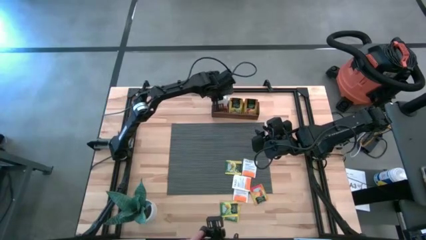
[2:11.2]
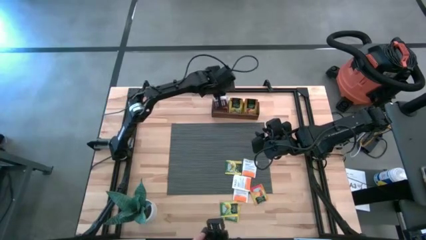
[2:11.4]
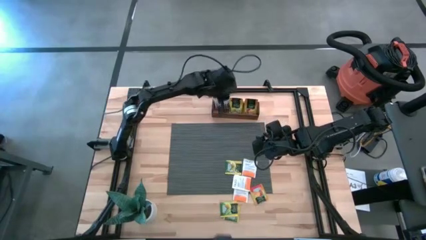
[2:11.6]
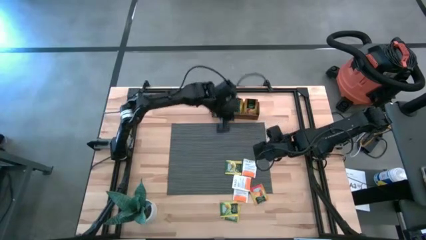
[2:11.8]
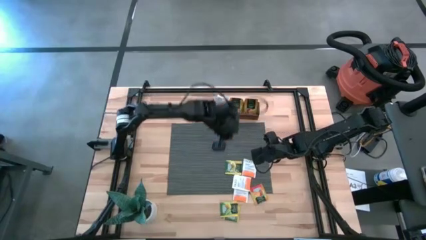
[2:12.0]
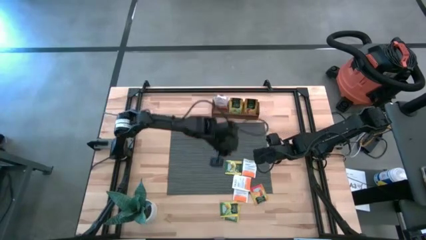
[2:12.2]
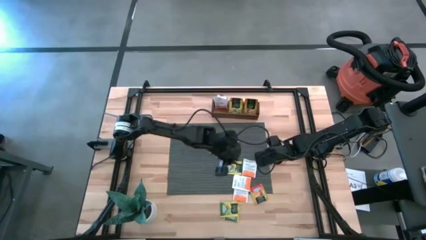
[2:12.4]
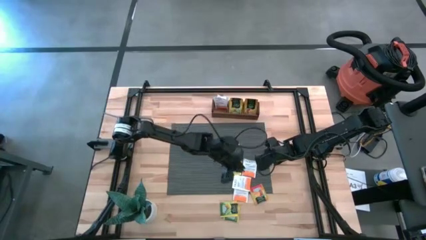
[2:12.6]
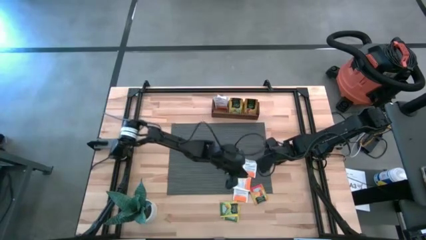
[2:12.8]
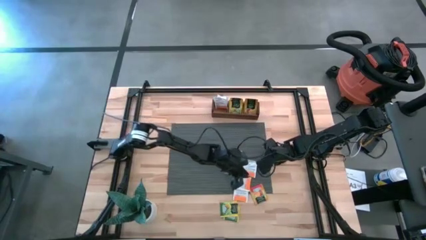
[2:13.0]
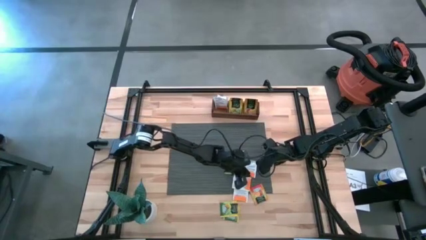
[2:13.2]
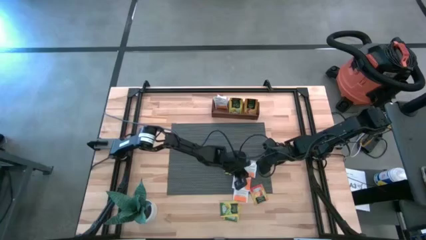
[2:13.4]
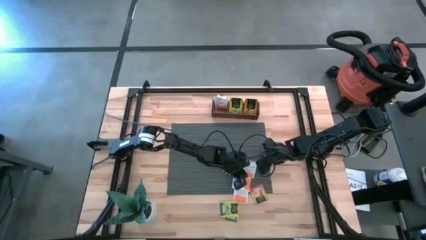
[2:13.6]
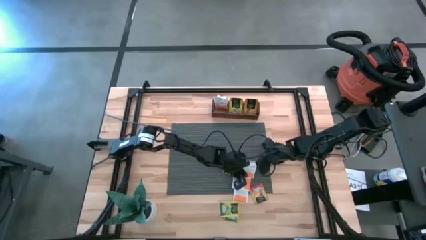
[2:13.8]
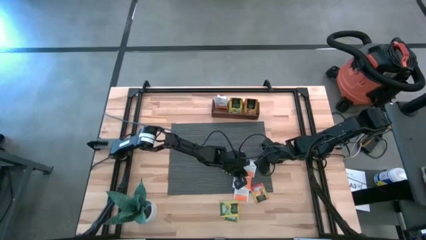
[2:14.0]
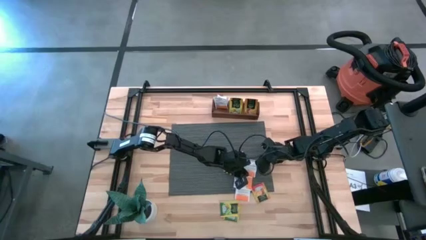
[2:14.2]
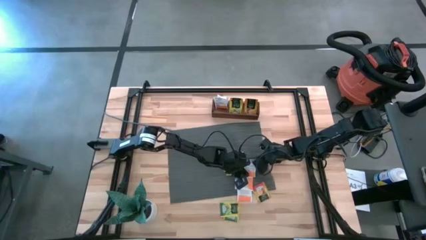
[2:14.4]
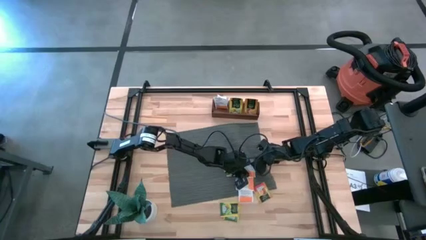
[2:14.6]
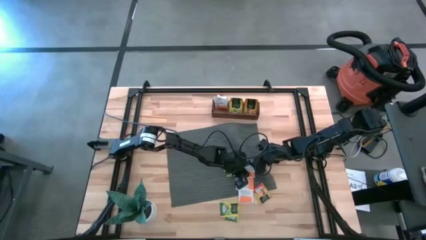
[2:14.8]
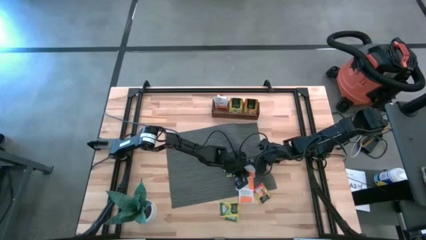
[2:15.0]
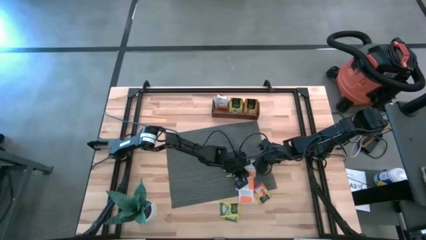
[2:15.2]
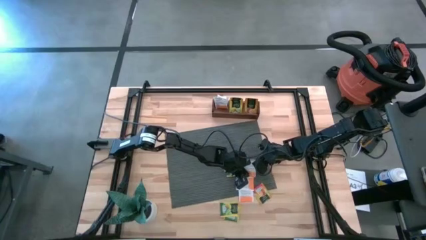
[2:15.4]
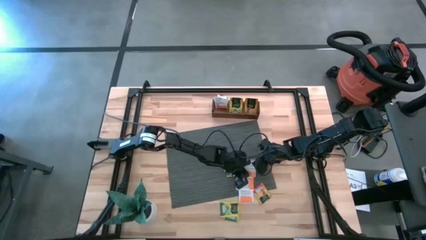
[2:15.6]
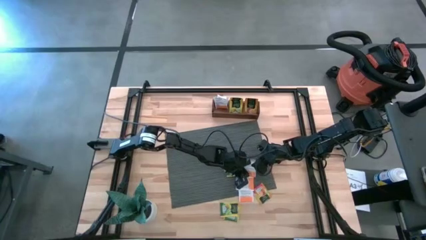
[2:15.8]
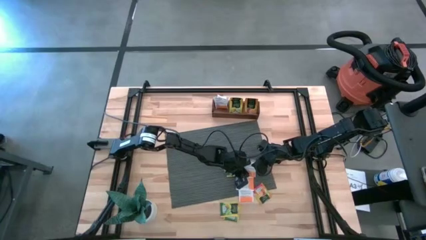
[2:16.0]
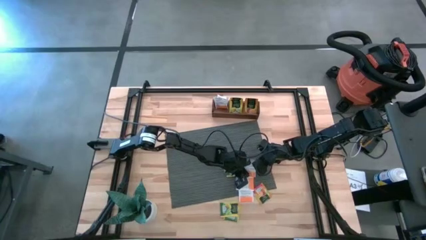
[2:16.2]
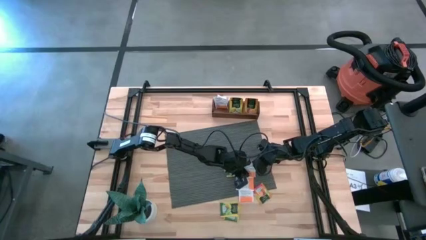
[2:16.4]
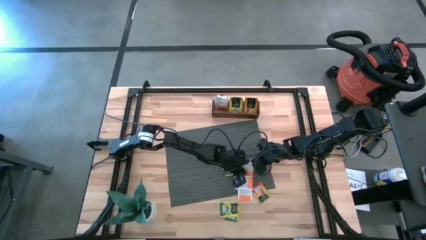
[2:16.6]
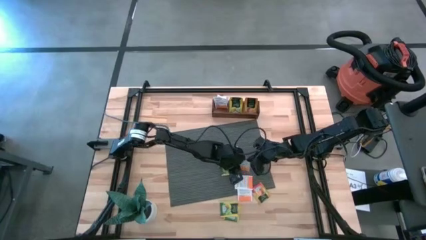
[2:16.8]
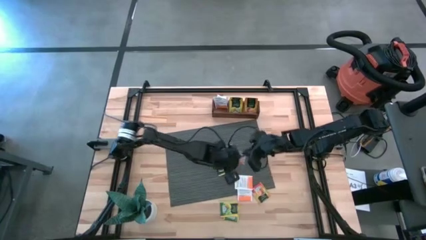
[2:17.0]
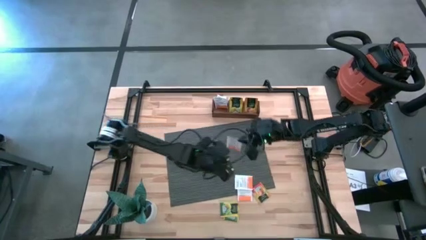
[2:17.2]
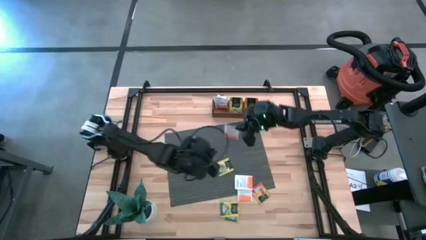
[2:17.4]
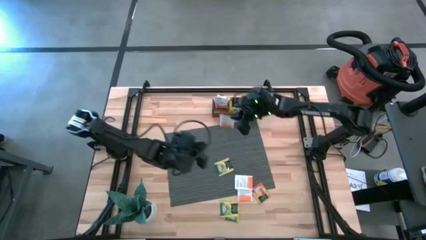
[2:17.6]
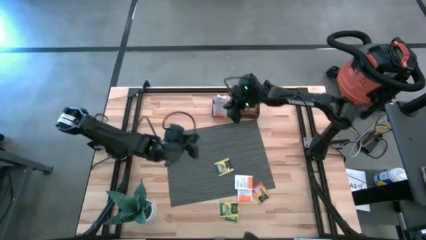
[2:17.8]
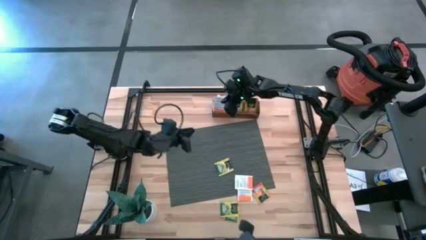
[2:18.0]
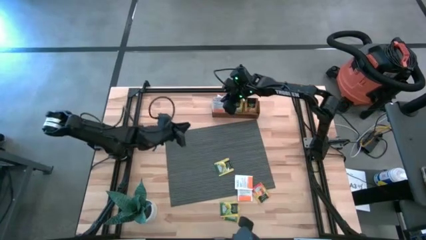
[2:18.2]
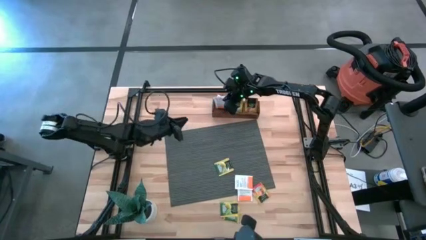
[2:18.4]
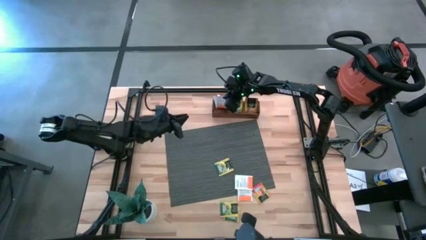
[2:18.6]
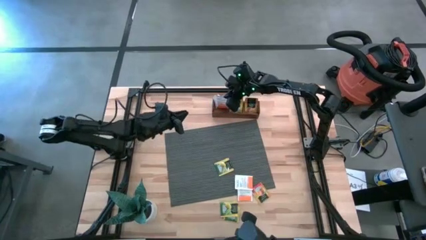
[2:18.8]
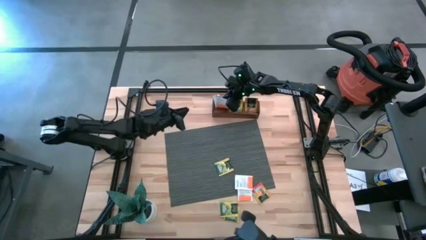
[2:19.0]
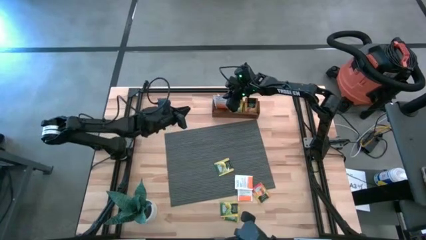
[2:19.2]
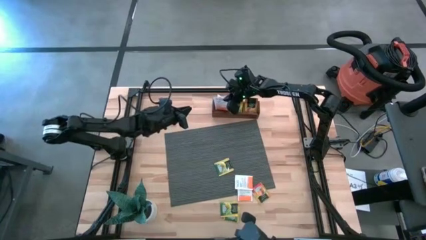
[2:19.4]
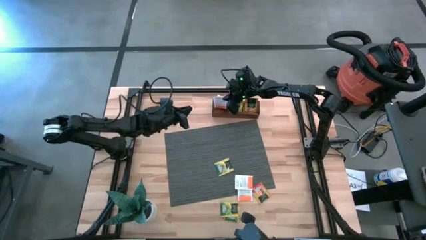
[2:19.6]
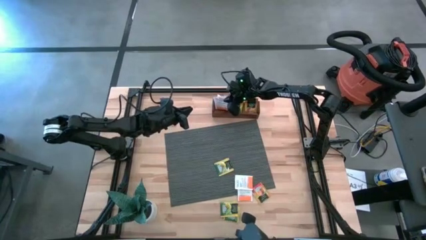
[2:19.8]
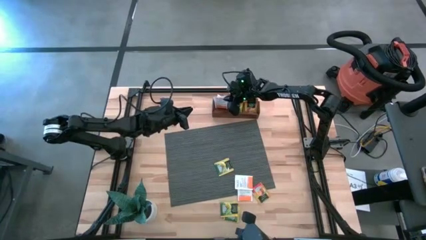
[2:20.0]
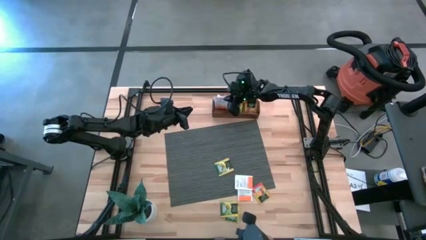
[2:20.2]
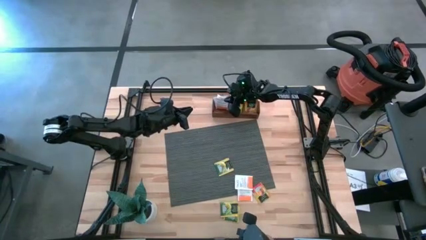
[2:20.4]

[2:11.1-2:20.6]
Task: Pick & Place Tea
Put the white tea bag into the left section of the wooden organizer

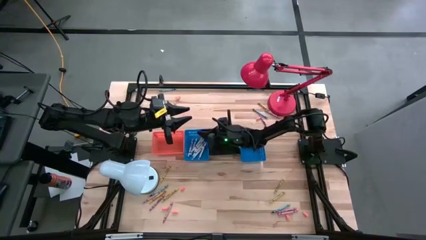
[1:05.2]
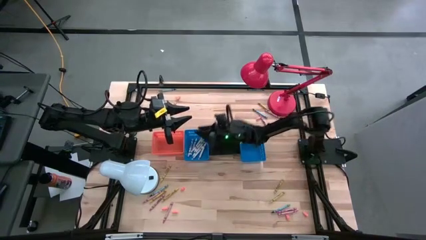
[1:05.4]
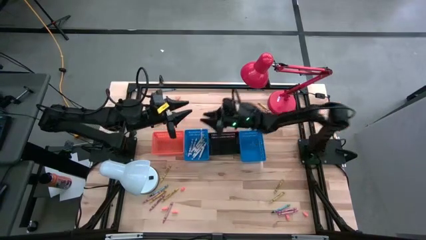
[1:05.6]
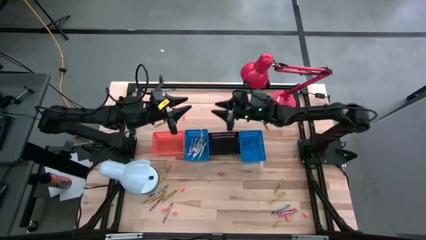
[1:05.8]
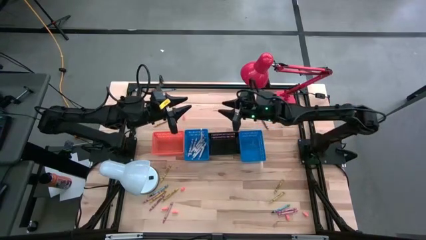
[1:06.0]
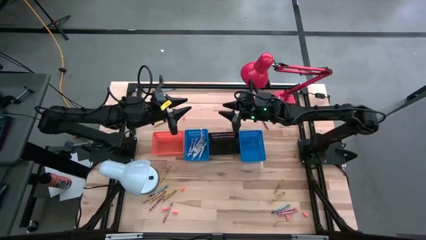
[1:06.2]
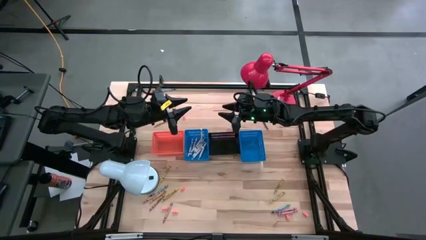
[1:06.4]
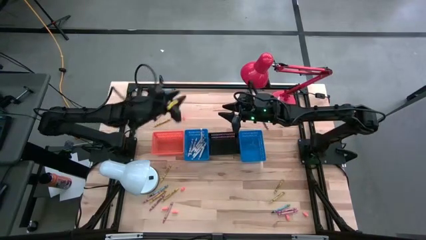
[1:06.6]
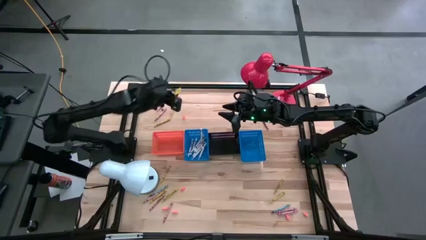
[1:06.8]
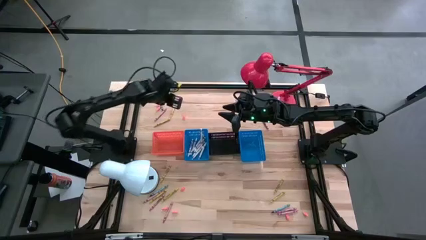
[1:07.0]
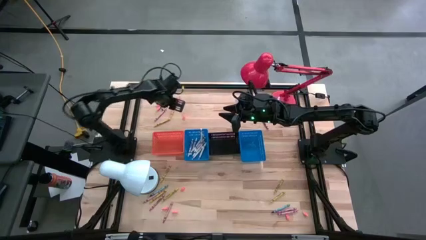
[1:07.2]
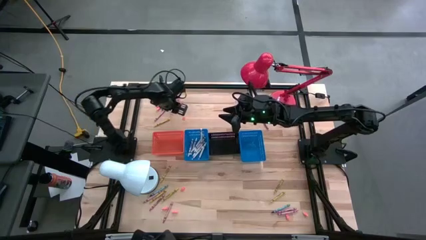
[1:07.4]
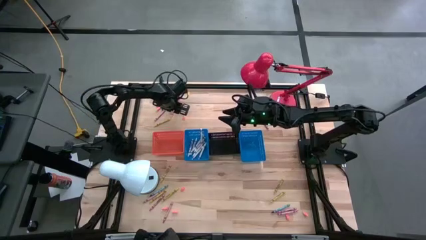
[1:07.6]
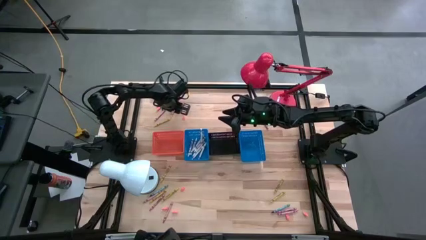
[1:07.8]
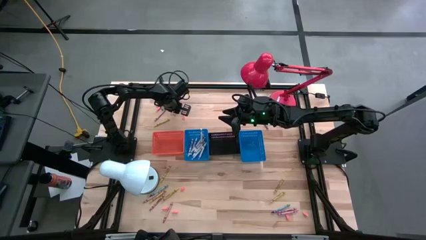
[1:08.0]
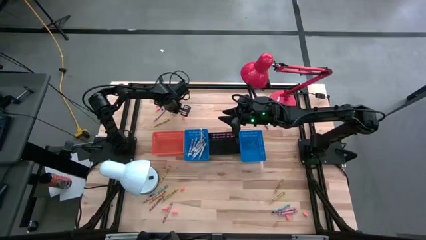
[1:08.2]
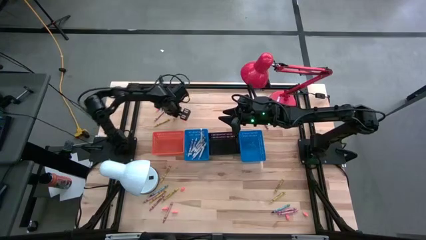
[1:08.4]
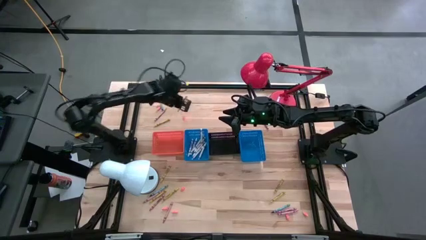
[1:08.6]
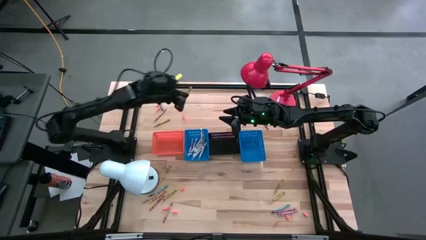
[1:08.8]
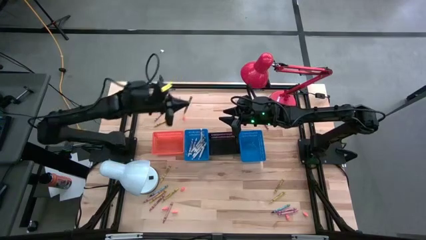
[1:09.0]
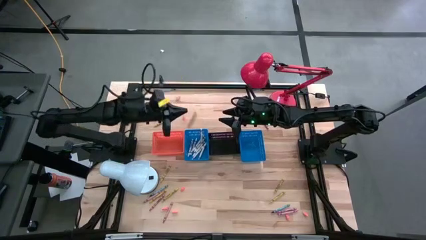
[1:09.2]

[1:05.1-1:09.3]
Task: Sort crayons
Put the yellow crayon into the black bin

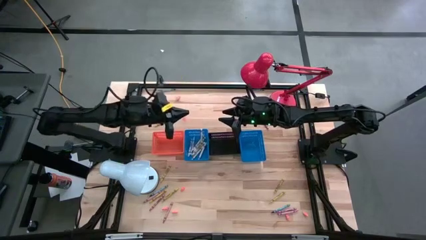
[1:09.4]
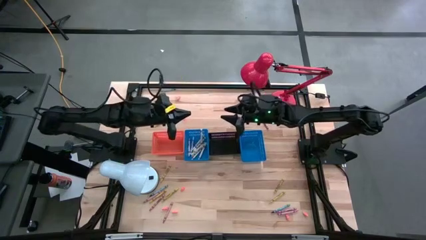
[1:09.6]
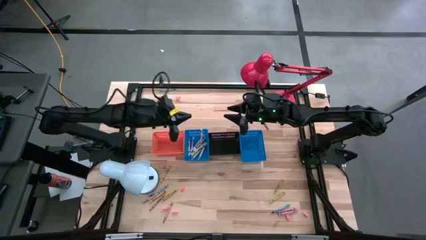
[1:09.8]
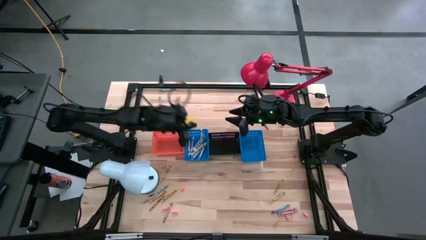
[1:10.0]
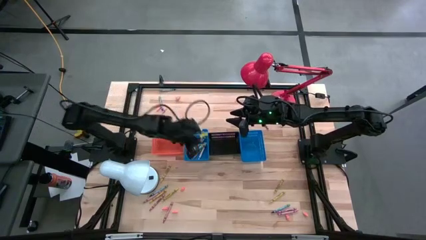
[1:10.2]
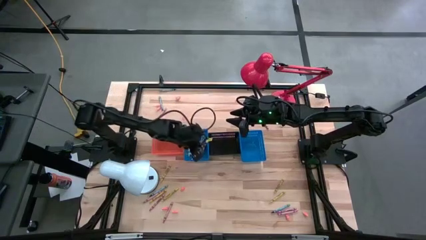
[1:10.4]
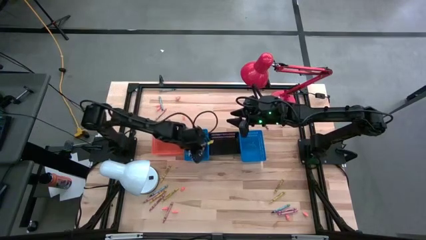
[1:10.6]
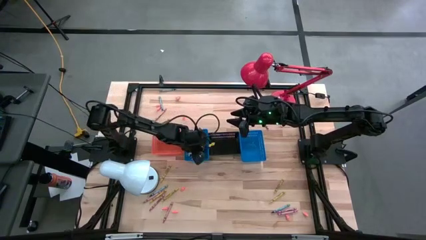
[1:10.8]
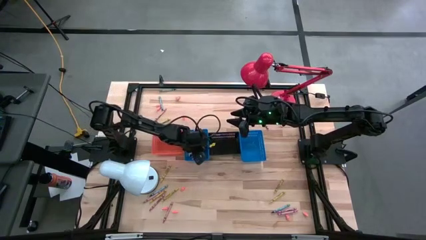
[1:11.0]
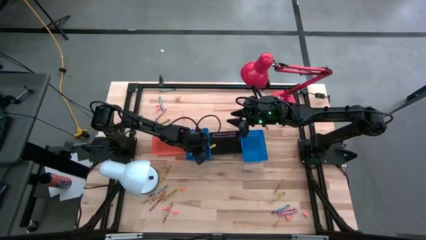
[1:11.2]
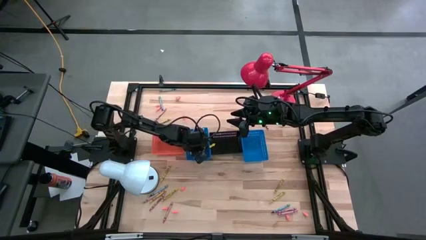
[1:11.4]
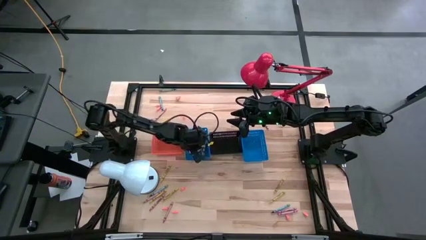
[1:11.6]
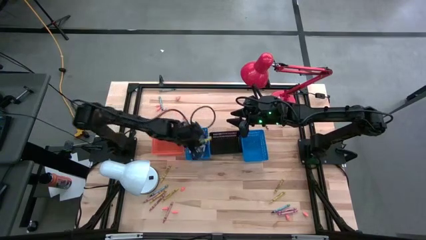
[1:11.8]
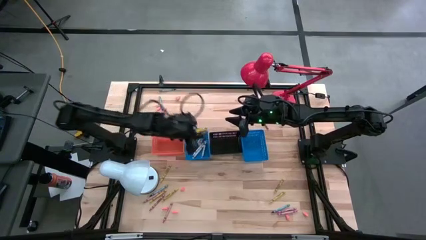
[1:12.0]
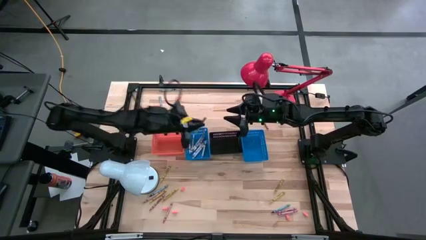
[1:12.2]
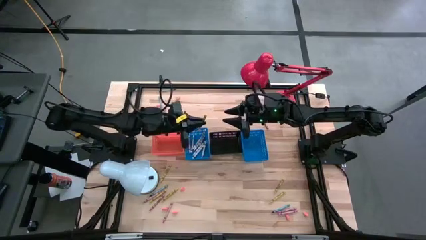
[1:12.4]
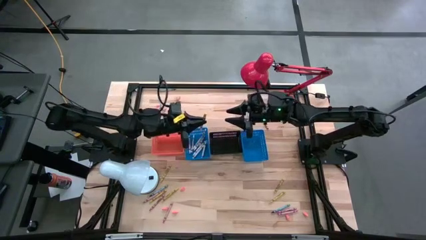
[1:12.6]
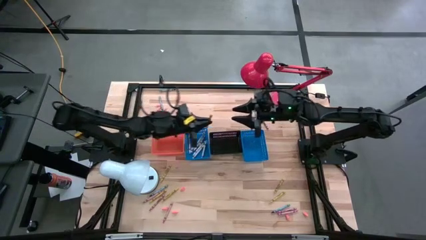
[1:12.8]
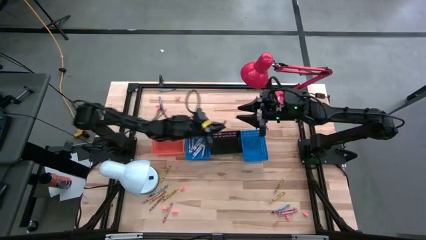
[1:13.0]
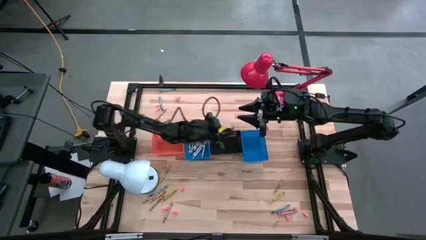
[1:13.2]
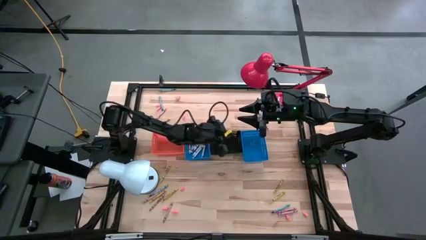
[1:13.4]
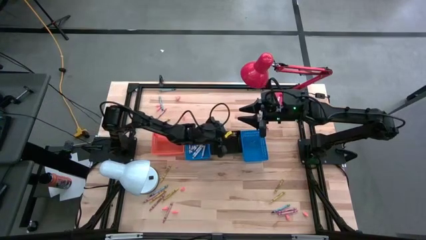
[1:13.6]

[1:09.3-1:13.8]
Put the yellow crayon from the left blue bin into the black bin
